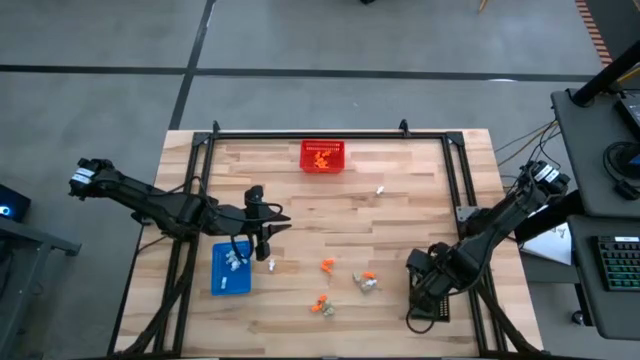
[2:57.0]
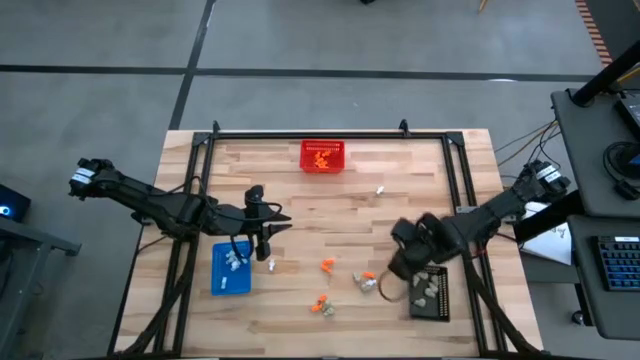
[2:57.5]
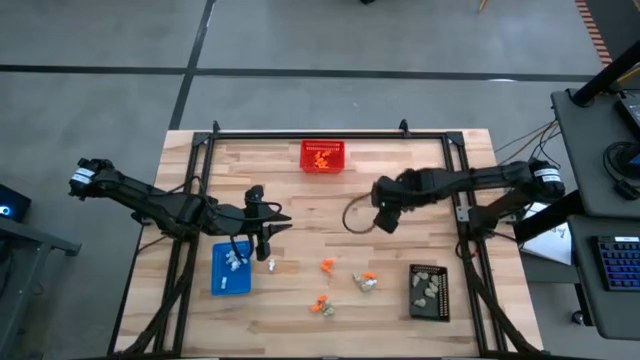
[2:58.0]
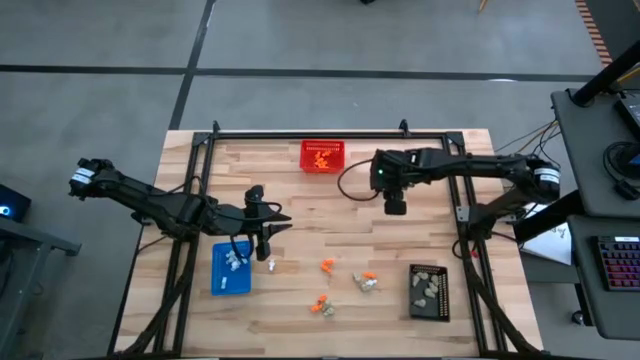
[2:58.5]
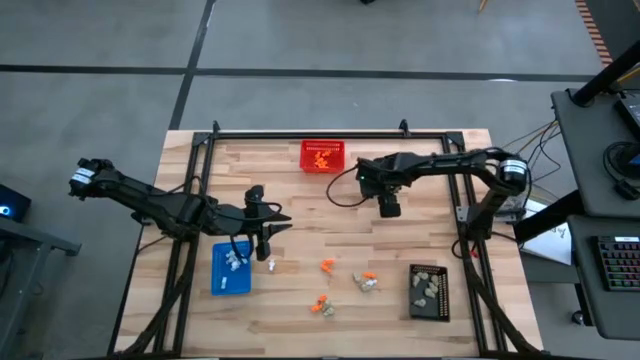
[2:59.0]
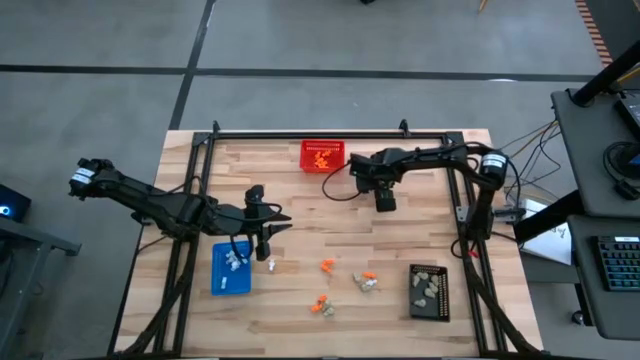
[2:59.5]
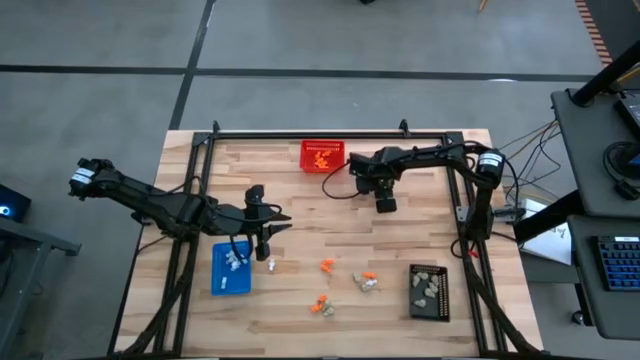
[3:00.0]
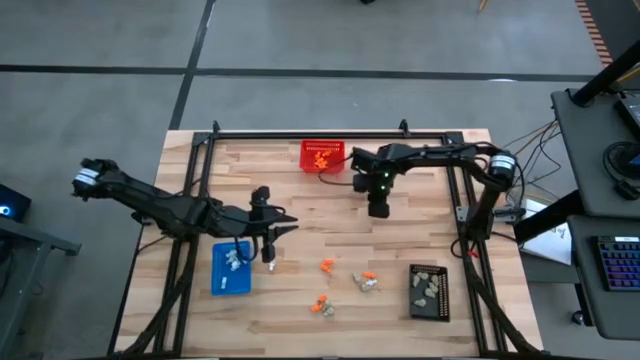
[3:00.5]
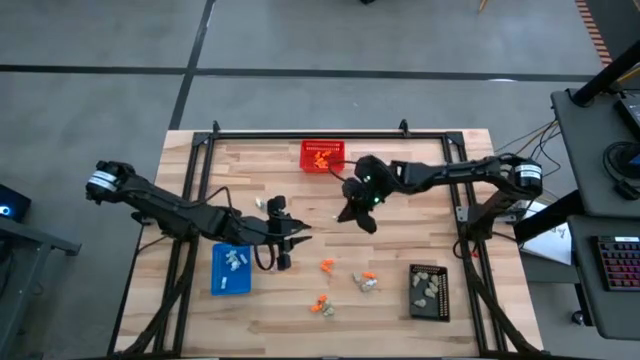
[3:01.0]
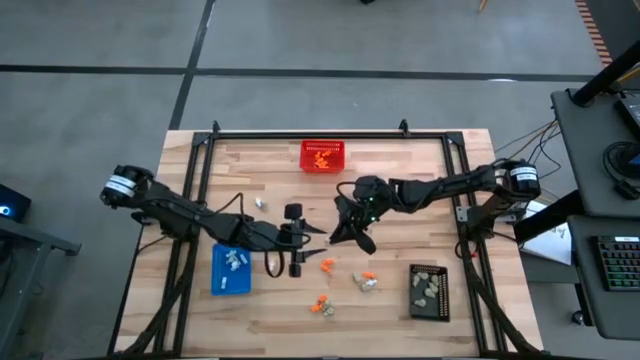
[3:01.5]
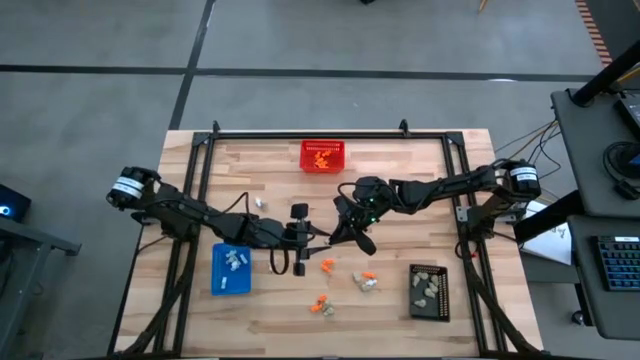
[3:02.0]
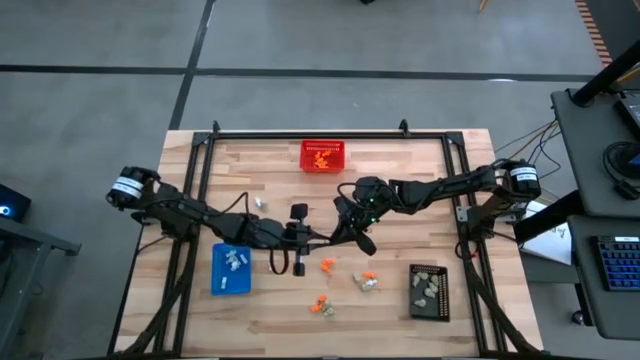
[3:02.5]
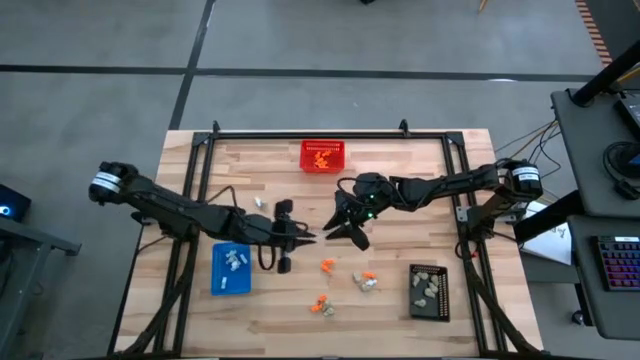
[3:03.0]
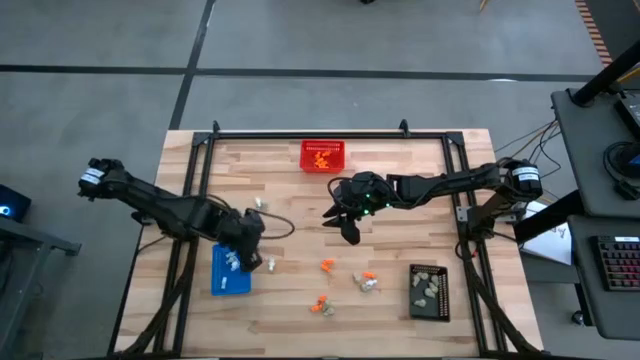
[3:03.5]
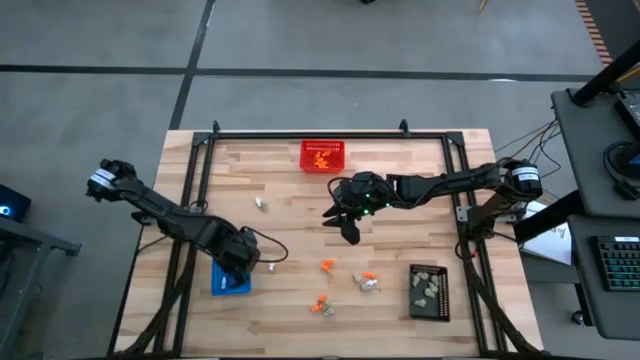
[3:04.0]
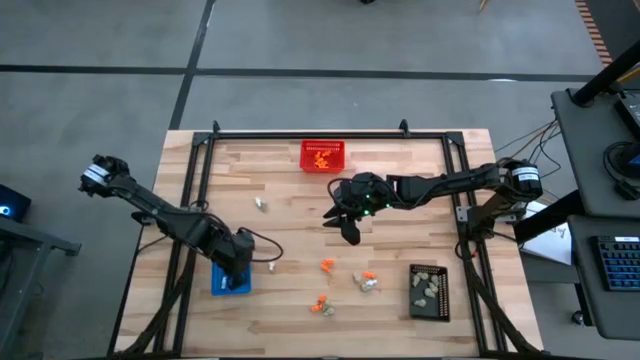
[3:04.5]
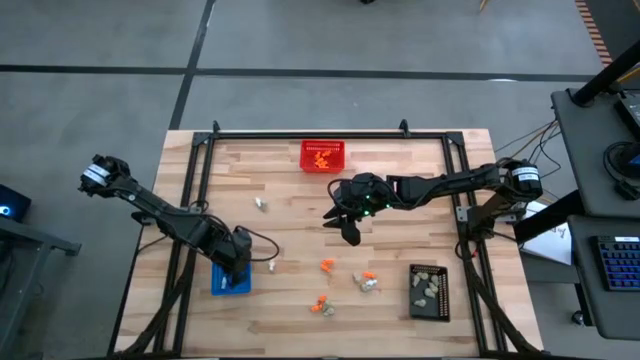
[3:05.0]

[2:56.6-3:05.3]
Task: Sort Halloween decoration
Put the white skeleton toy into the blue bin

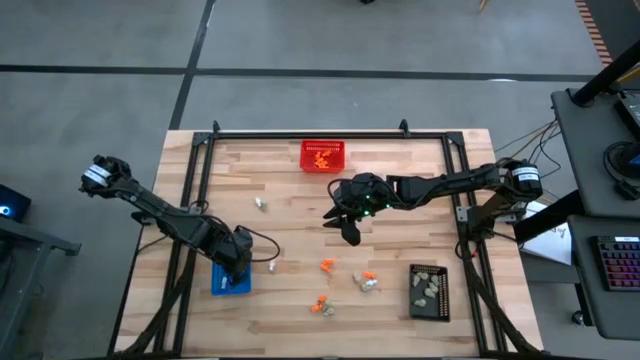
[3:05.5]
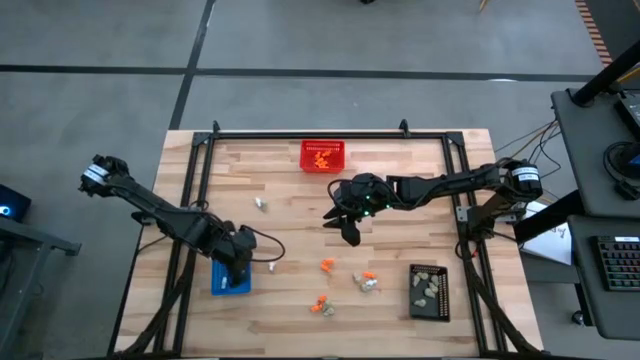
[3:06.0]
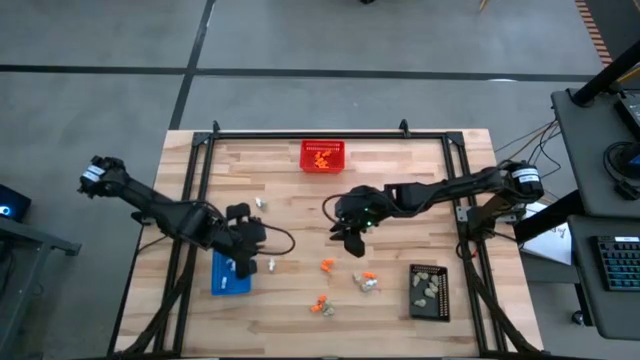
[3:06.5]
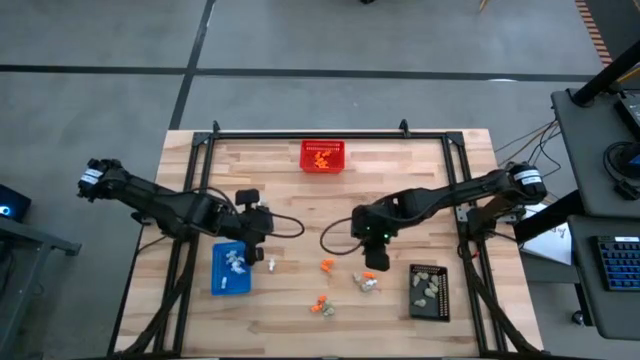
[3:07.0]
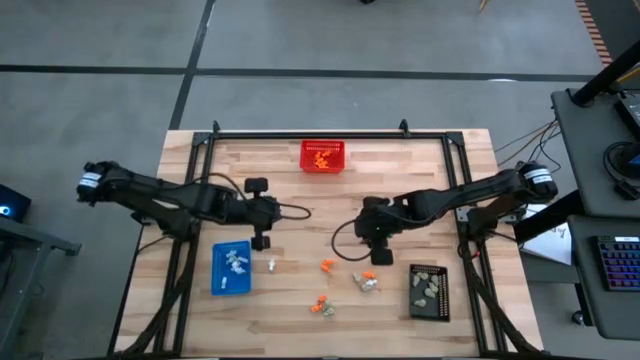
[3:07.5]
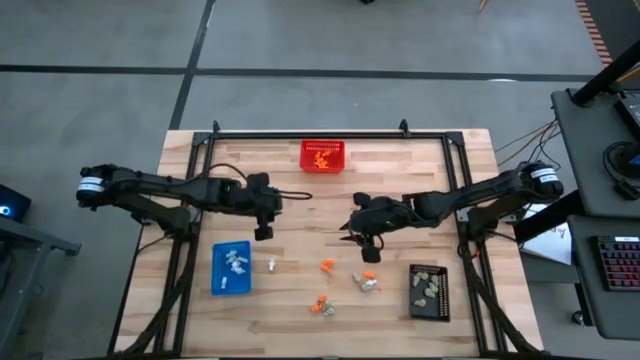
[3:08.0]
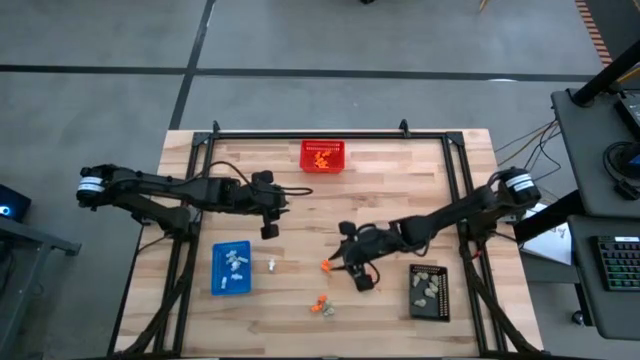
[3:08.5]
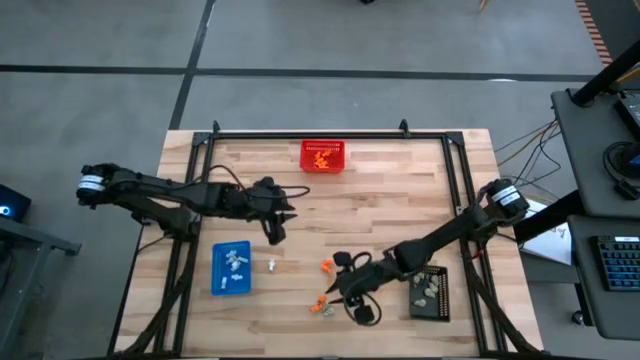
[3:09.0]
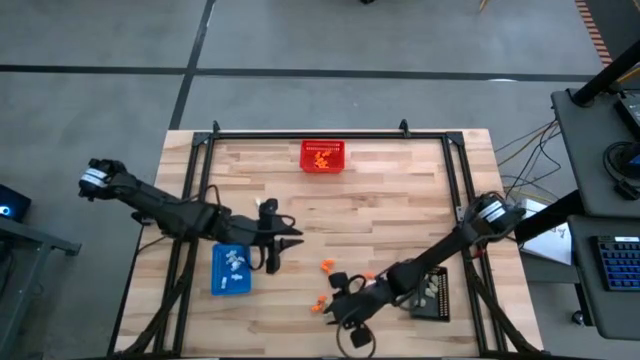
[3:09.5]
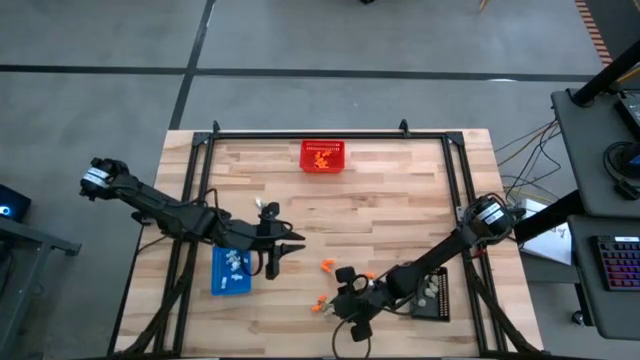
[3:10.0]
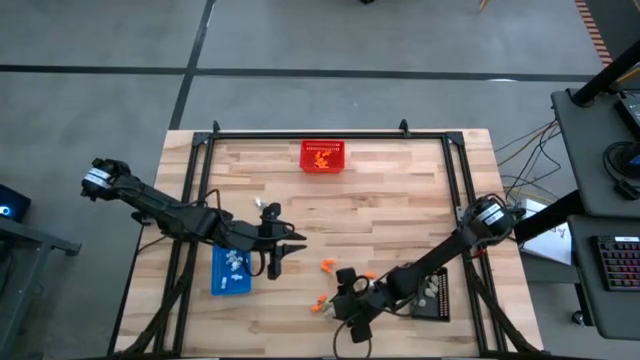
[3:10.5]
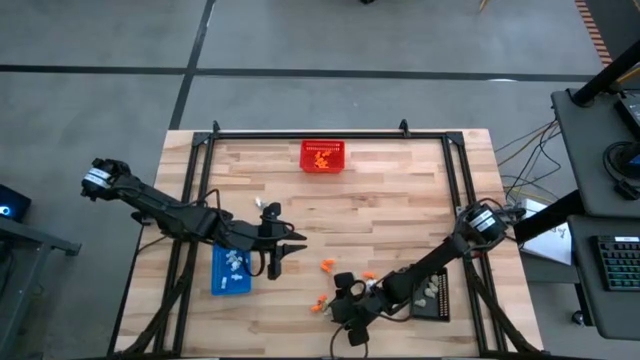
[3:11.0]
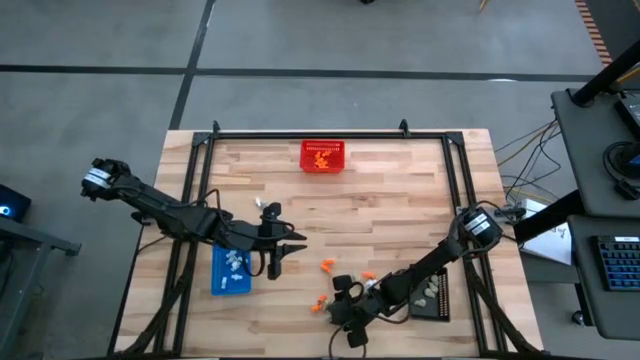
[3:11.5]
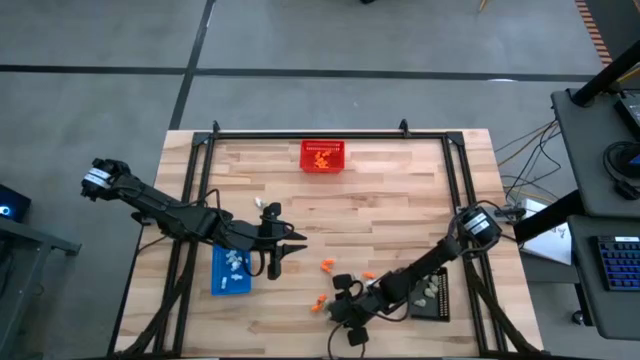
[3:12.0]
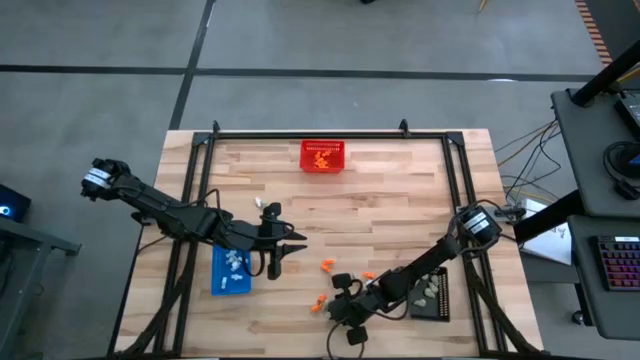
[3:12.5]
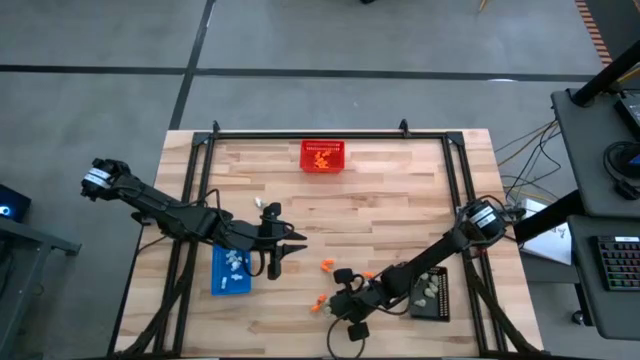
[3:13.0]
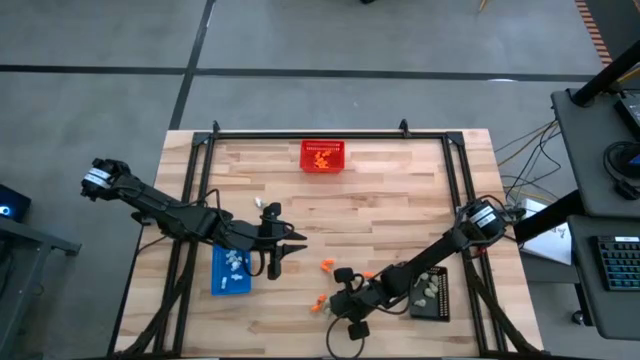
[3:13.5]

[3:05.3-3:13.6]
Put the gray skull toy into the black bin

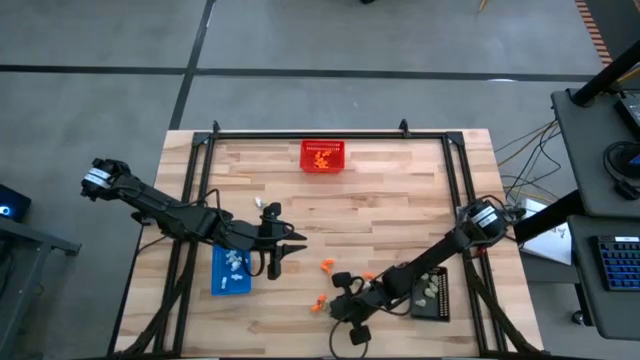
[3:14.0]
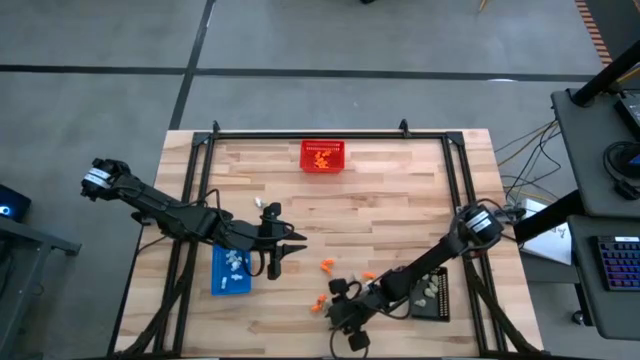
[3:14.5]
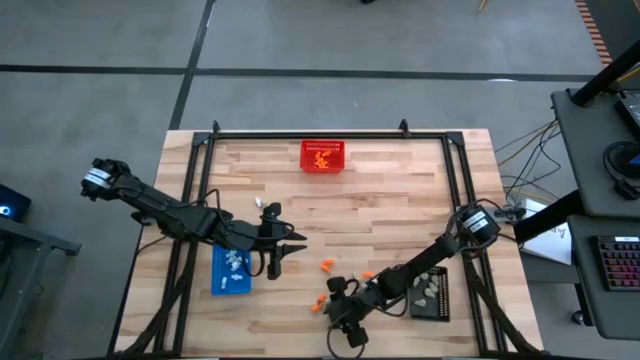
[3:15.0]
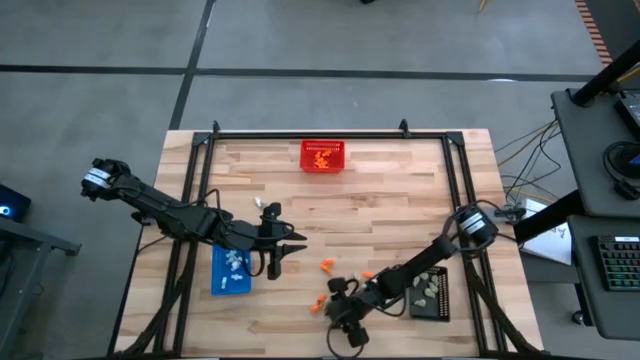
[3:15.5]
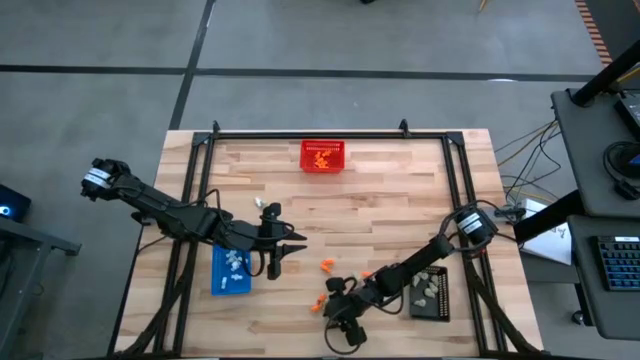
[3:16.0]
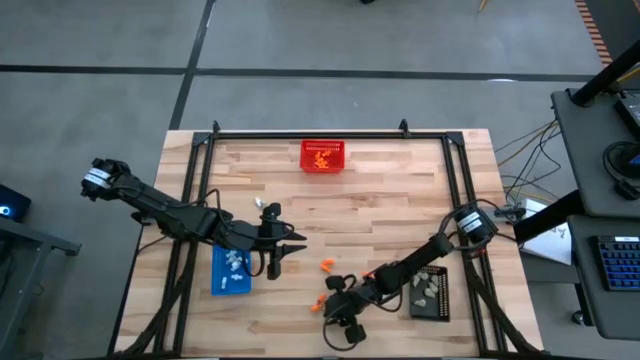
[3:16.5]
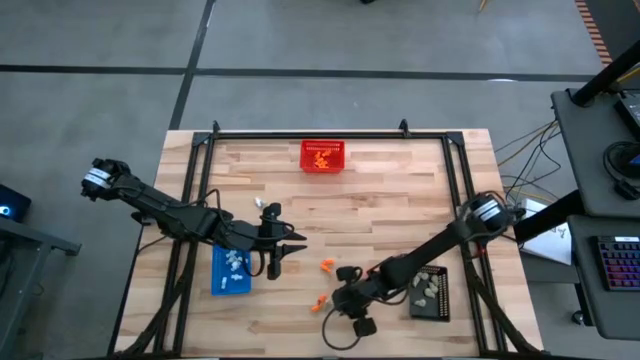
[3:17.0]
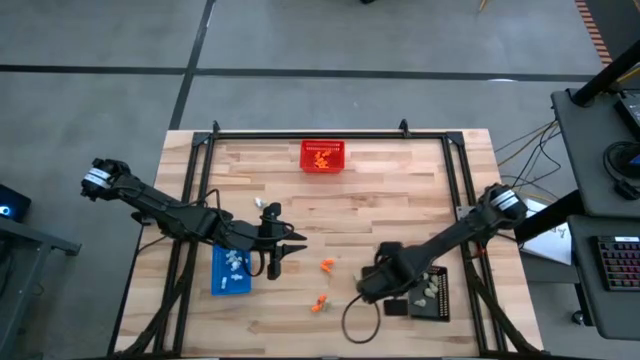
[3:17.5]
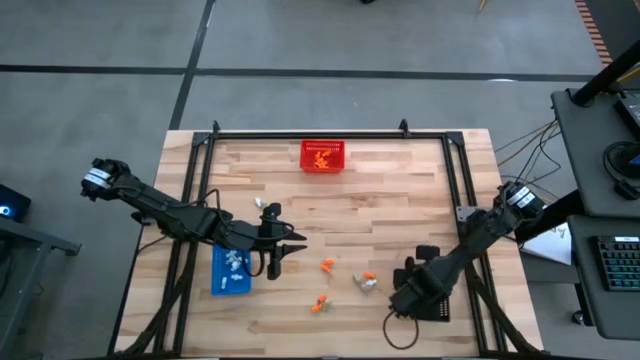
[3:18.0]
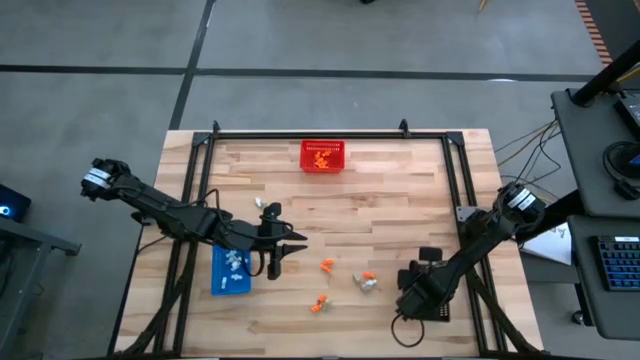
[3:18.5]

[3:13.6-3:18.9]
Put the gray skull toy into the black bin
